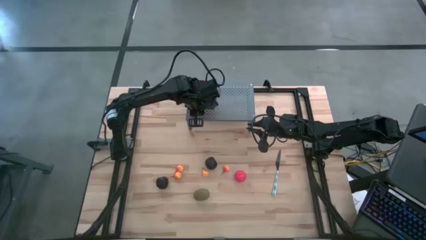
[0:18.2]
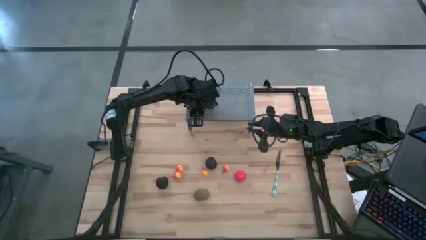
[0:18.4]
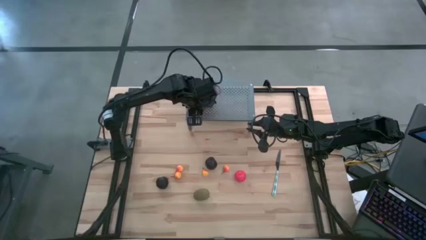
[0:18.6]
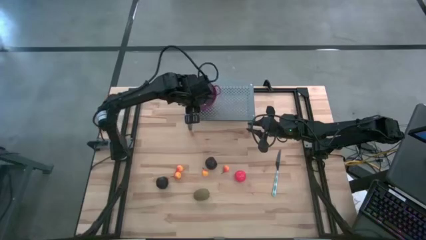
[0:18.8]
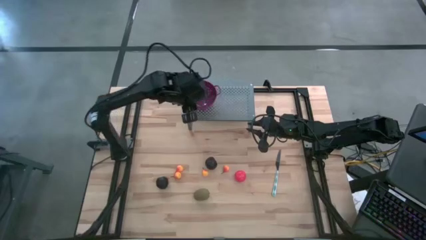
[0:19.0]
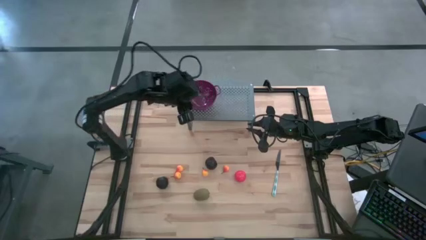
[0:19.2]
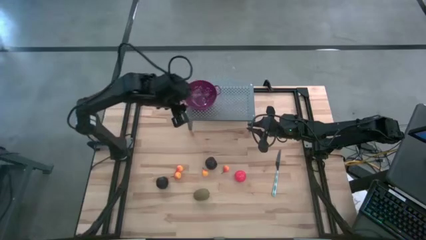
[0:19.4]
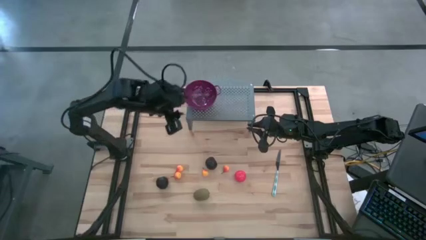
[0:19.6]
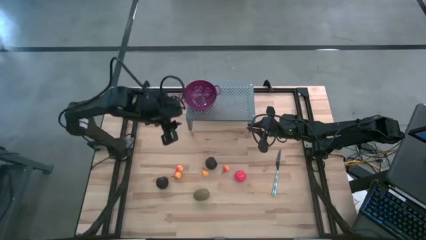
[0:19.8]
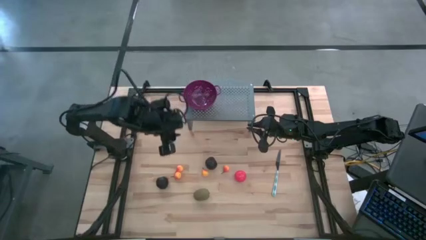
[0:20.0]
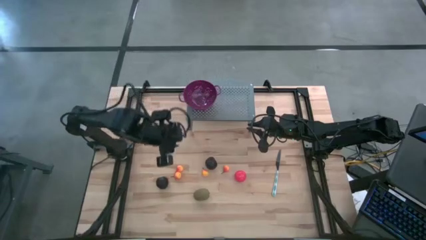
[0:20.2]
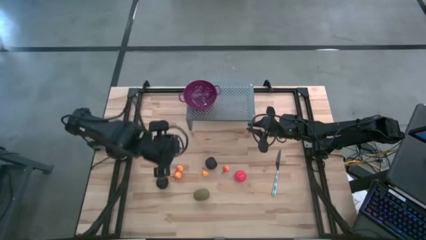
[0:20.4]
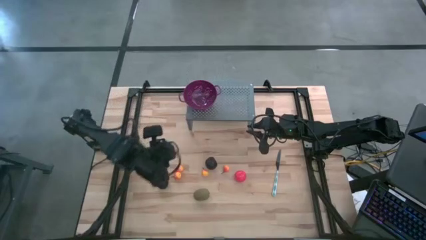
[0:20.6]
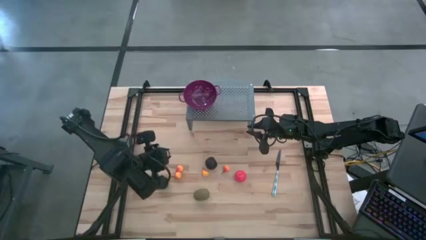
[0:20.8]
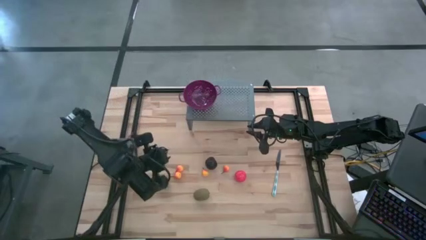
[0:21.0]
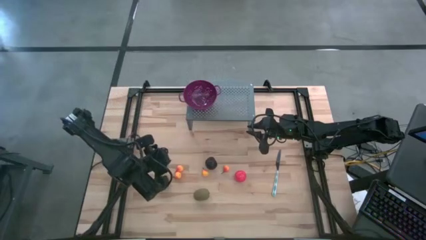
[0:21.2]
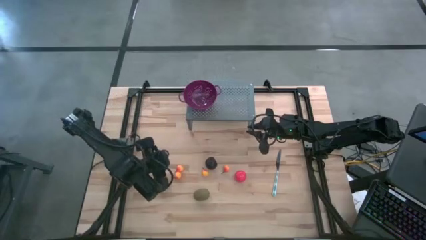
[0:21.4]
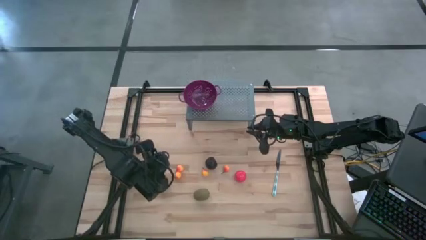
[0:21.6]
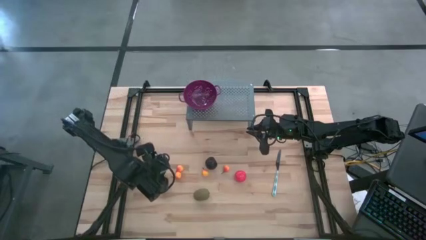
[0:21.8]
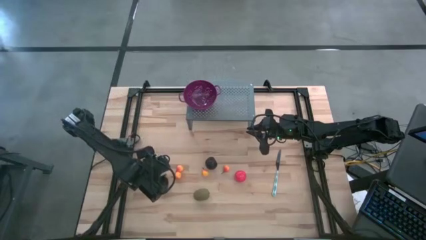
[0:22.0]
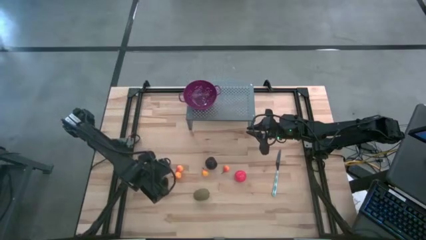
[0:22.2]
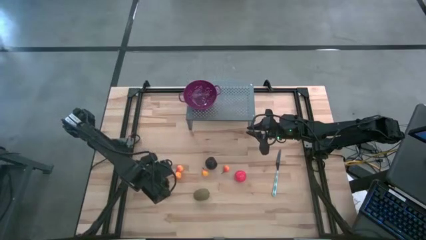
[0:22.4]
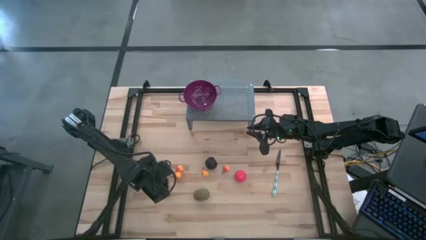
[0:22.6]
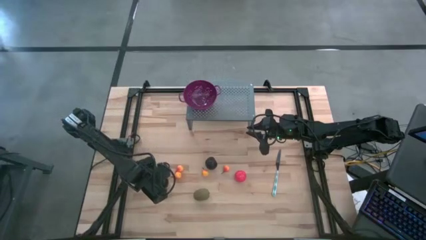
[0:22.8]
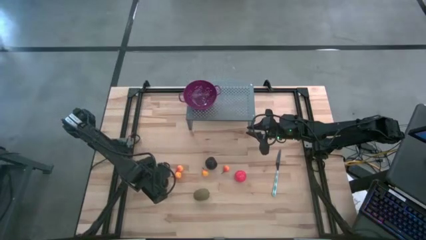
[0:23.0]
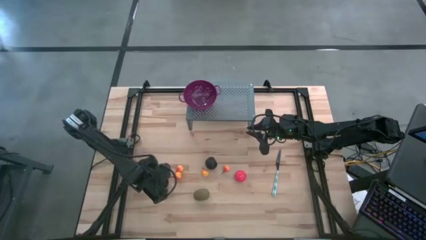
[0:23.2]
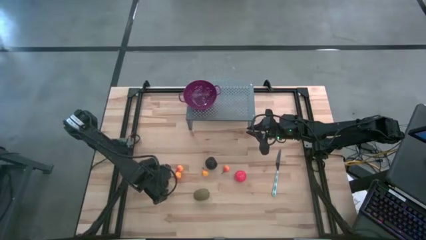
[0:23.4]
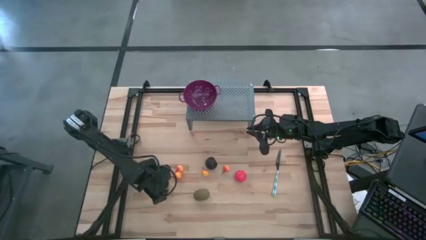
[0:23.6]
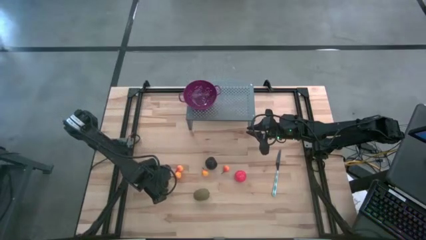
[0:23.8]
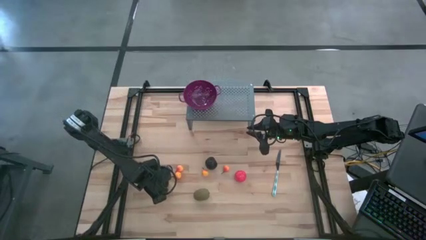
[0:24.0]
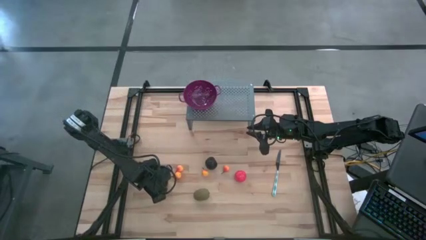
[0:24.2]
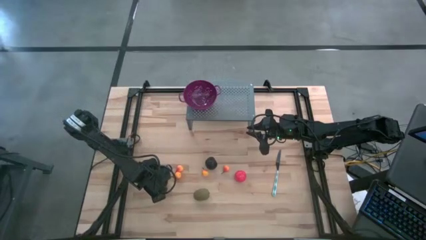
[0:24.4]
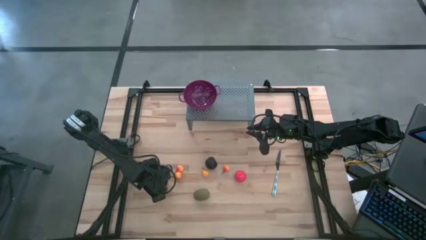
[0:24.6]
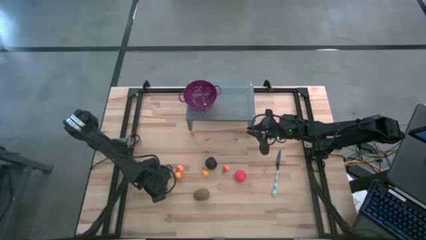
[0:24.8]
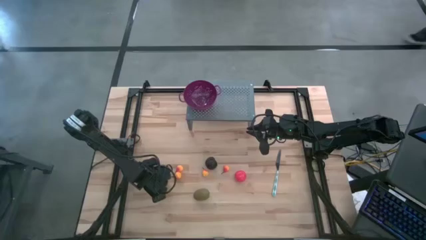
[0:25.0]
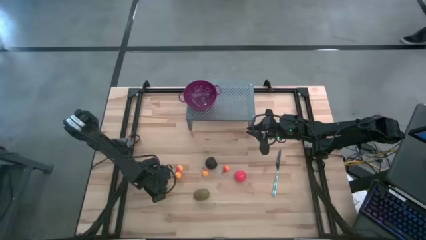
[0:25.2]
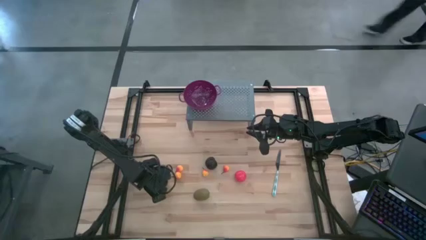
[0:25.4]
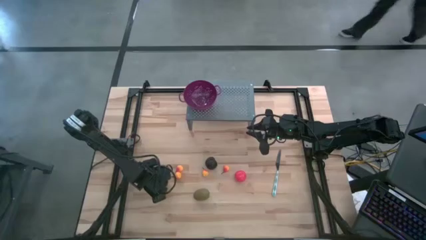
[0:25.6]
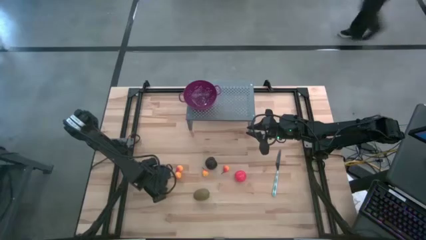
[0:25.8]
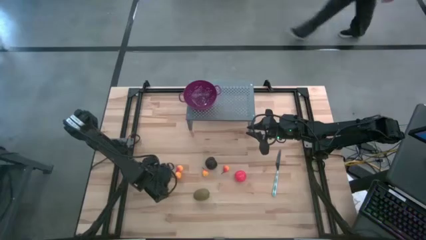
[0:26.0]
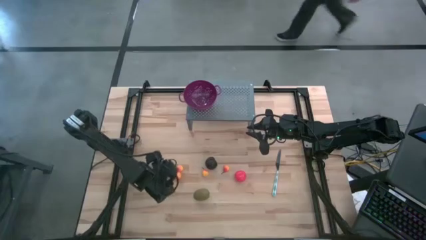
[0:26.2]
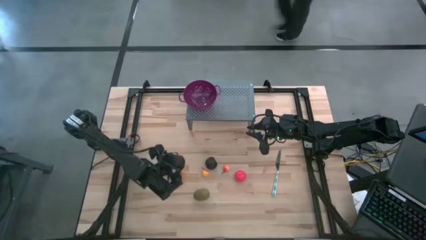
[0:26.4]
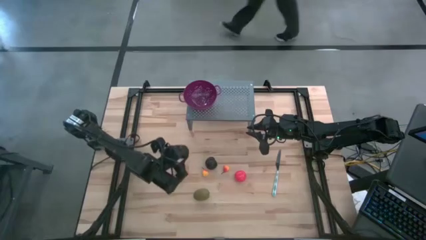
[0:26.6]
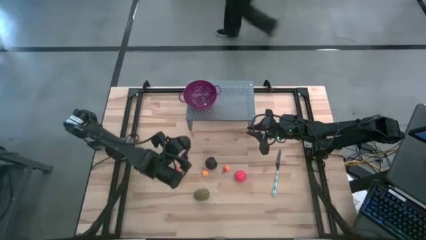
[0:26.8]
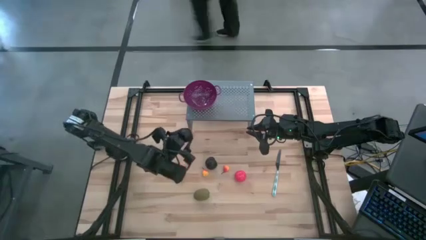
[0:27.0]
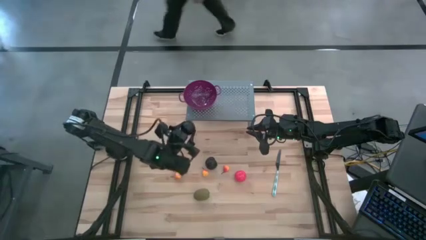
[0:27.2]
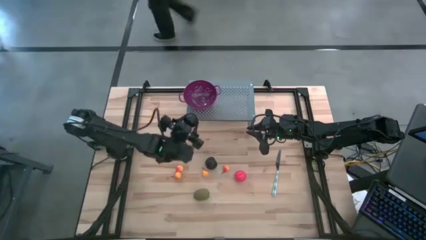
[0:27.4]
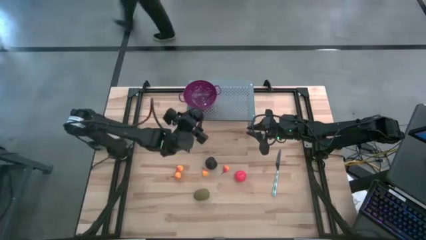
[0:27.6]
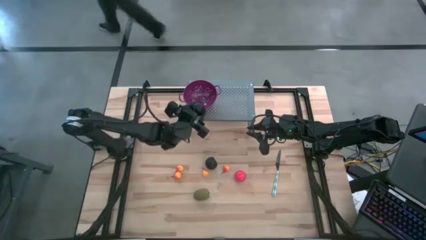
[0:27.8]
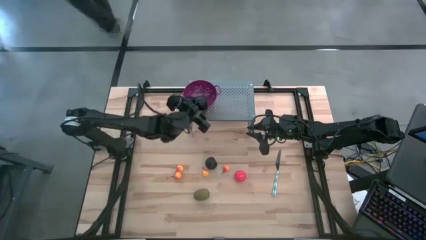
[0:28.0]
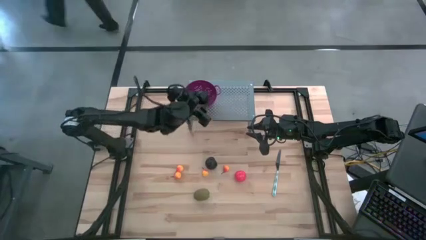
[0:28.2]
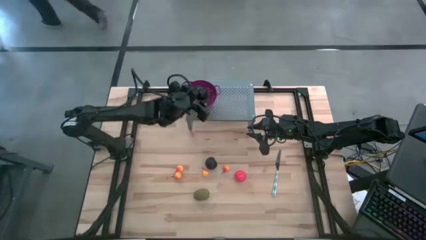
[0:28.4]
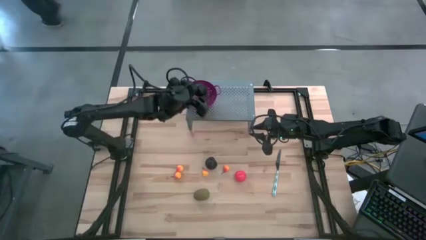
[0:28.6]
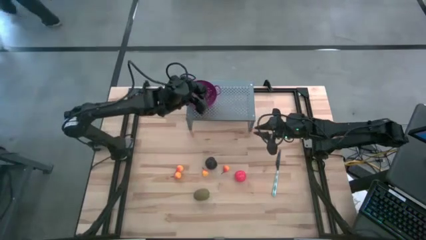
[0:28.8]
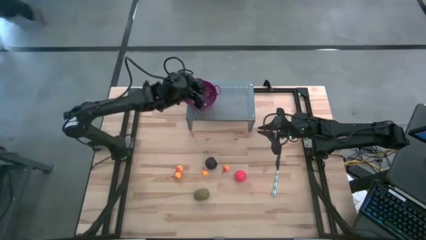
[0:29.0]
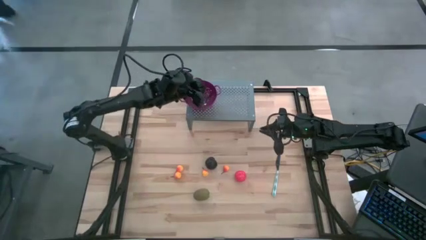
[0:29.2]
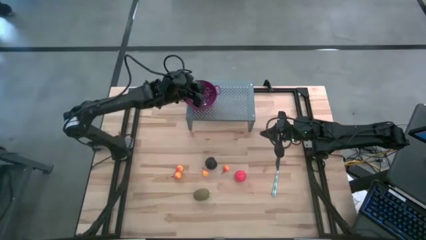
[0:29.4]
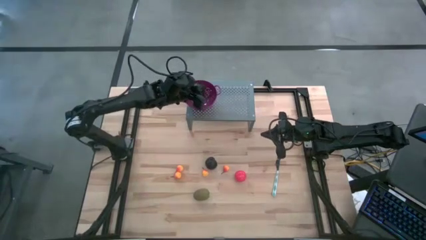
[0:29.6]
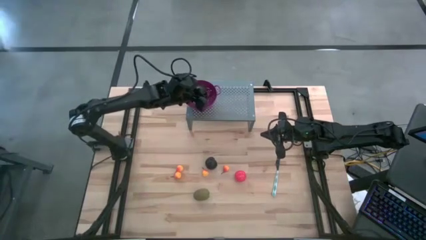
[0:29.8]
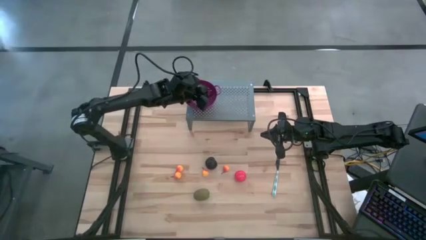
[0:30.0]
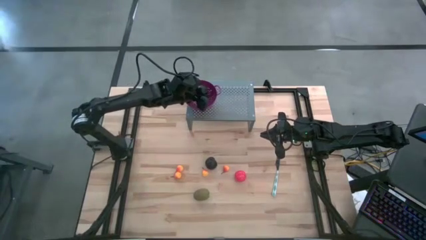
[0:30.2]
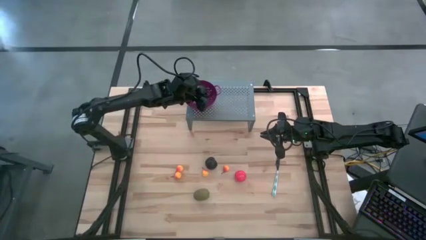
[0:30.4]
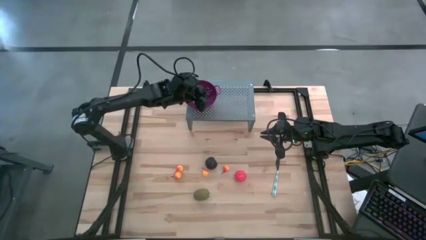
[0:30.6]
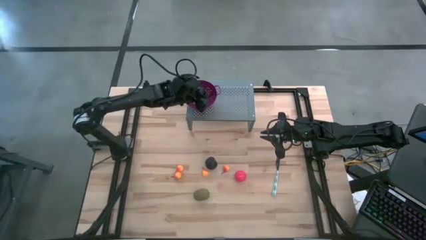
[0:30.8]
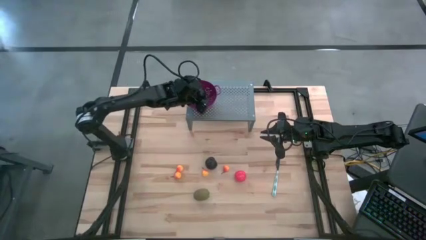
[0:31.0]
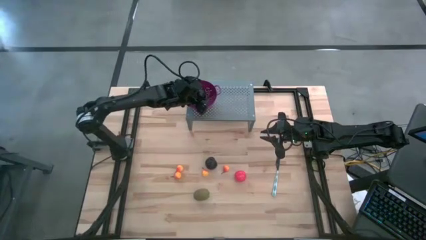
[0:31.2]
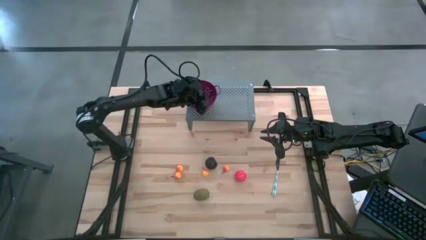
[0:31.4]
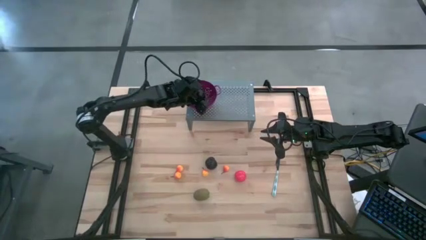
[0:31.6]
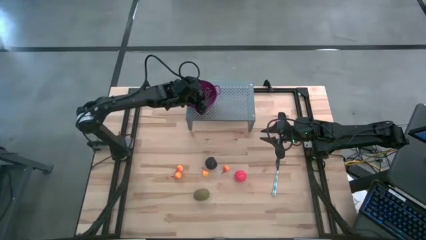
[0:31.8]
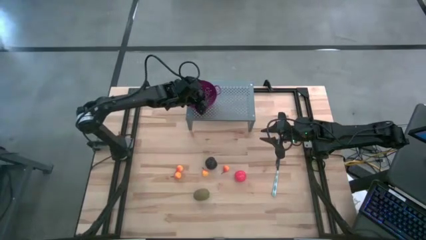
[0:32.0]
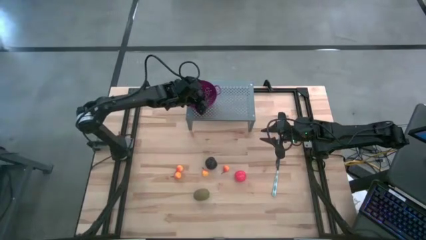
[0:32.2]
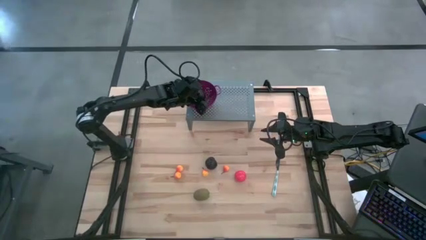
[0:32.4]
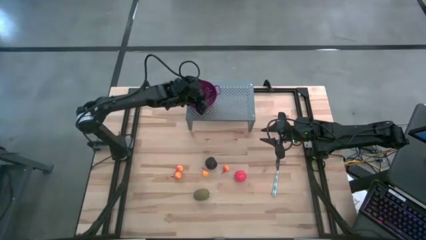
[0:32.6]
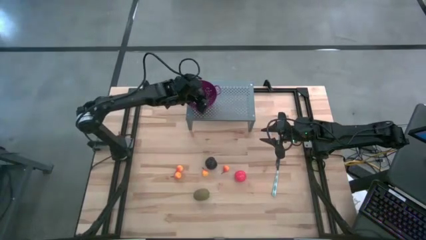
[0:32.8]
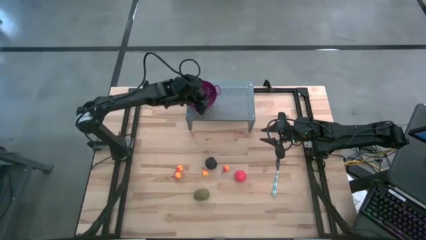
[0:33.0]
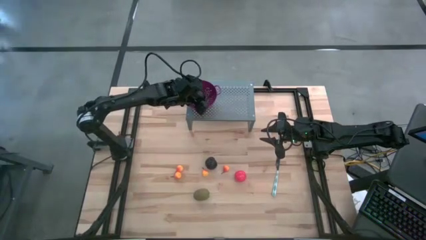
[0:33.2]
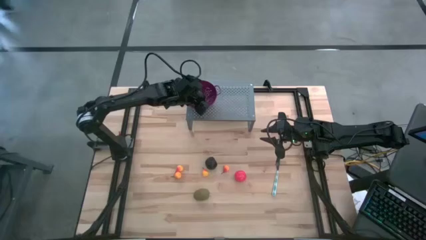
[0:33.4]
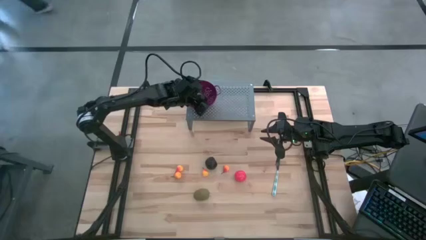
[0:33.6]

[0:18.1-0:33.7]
Task: Pick & Place Fruit
Put the black plum into the purple strainer bowl on the shelf

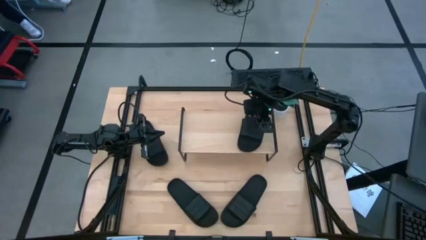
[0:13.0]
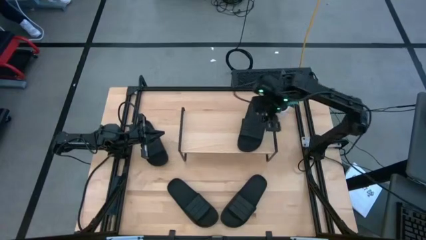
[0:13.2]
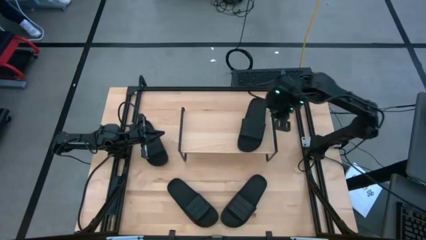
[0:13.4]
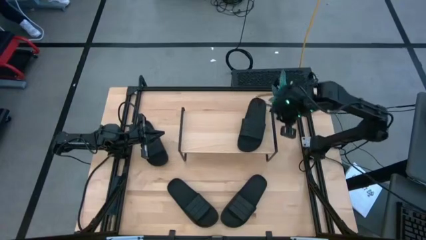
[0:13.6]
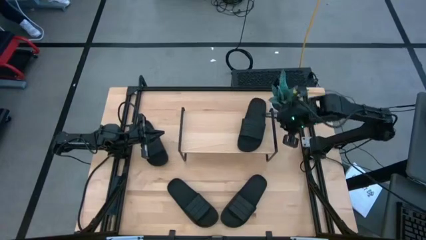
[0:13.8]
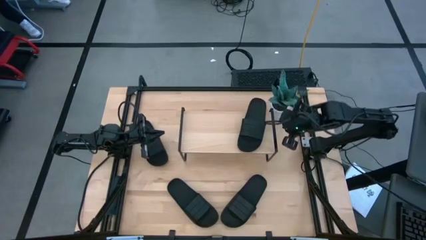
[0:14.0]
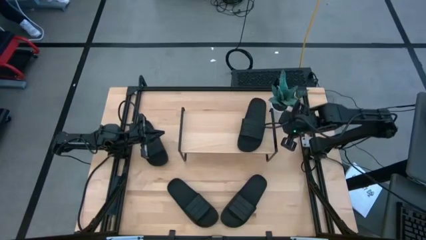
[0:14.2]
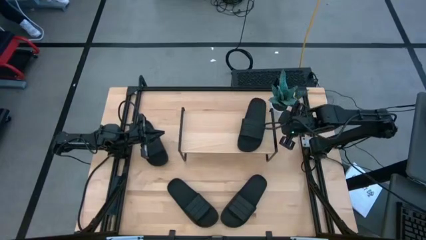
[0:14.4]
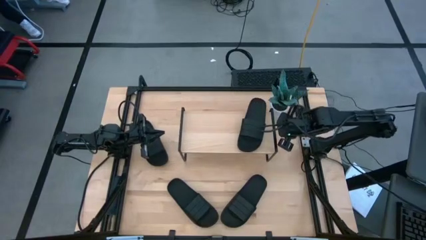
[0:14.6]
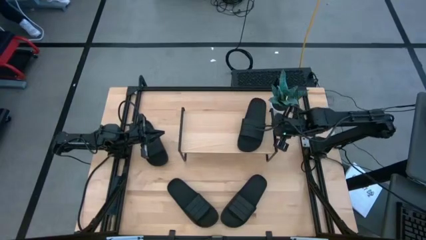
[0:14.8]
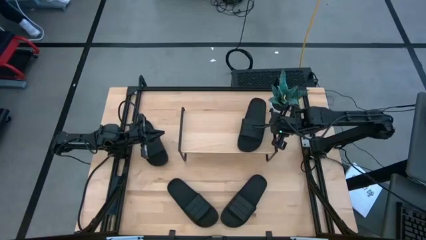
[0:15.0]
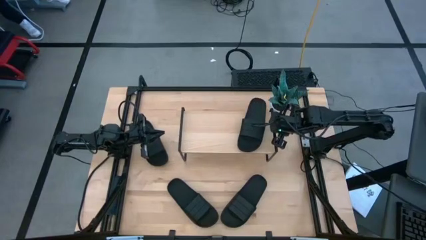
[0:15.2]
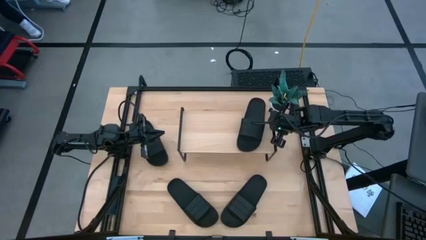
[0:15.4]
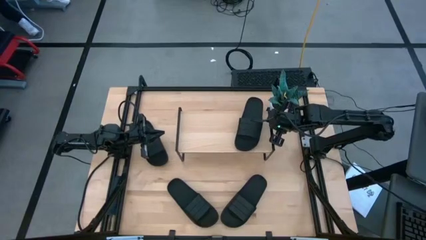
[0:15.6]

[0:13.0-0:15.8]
Task: Pick and place slides into the shelf
Adjust the shelf on the table
